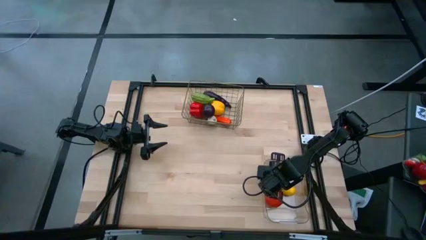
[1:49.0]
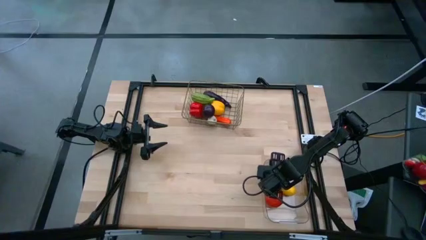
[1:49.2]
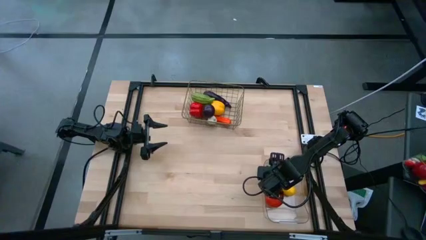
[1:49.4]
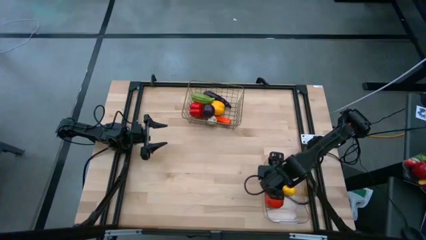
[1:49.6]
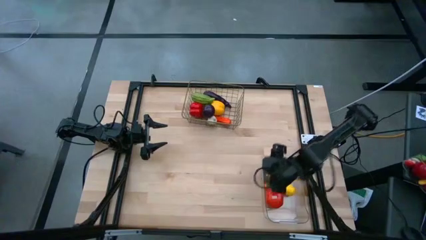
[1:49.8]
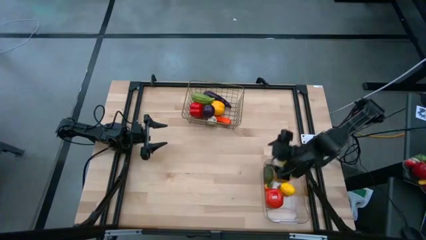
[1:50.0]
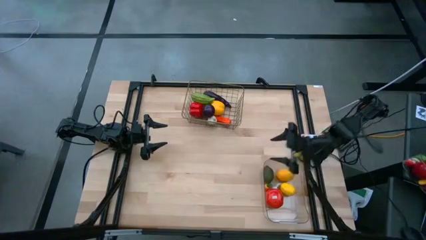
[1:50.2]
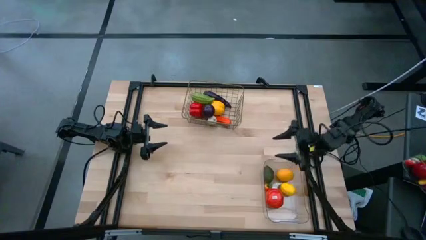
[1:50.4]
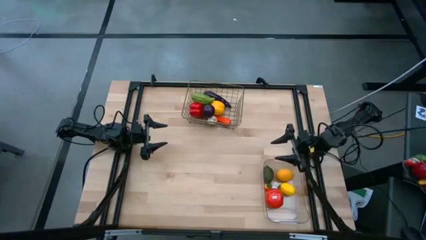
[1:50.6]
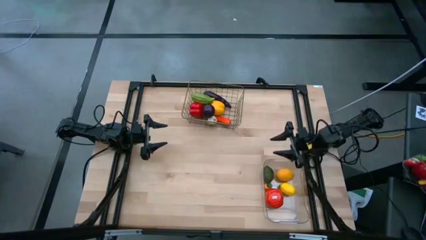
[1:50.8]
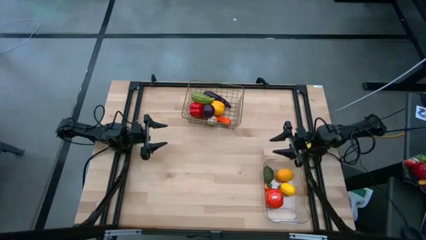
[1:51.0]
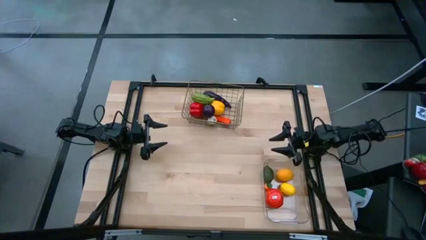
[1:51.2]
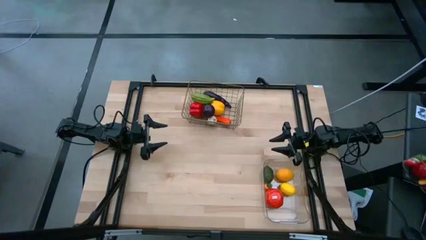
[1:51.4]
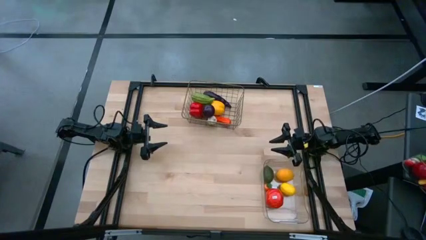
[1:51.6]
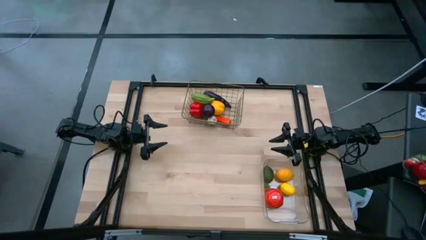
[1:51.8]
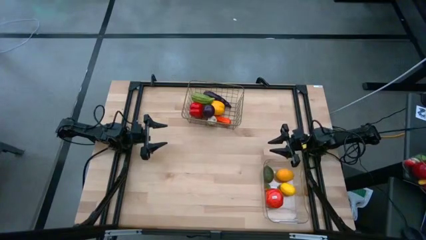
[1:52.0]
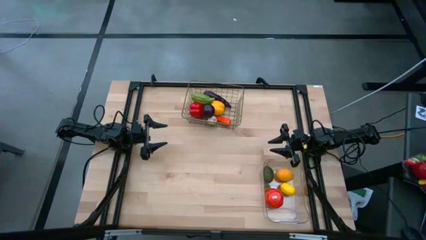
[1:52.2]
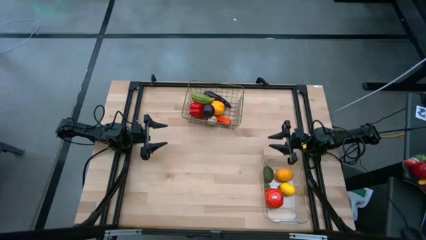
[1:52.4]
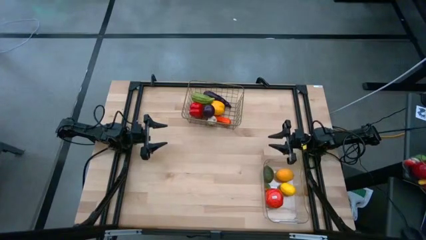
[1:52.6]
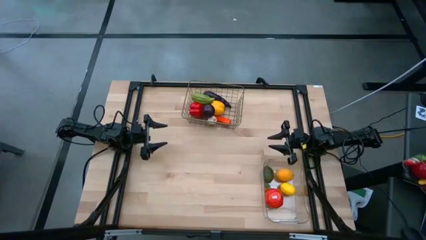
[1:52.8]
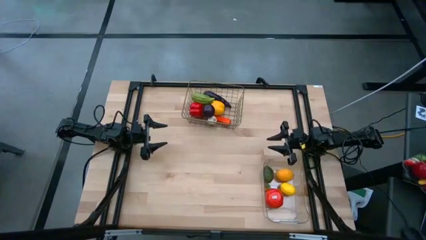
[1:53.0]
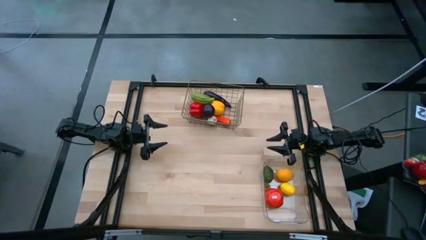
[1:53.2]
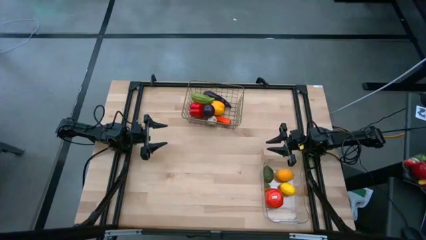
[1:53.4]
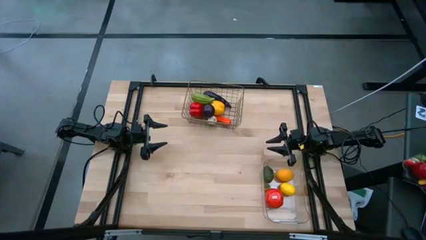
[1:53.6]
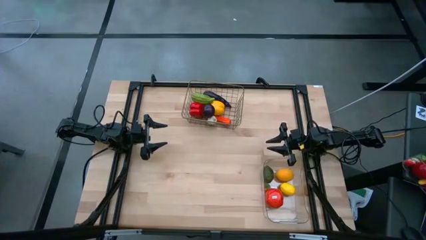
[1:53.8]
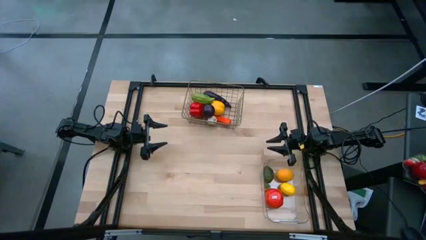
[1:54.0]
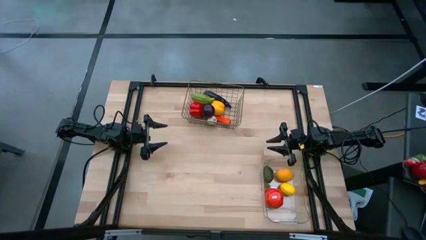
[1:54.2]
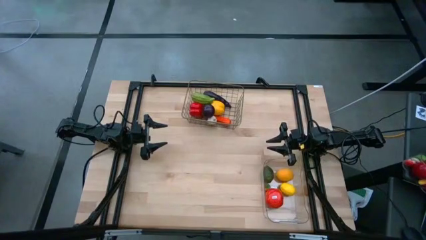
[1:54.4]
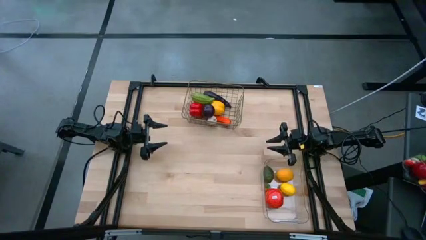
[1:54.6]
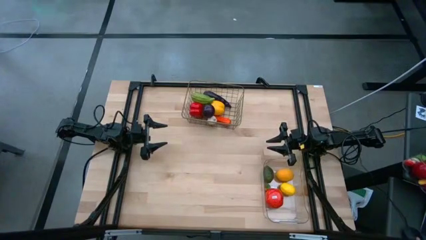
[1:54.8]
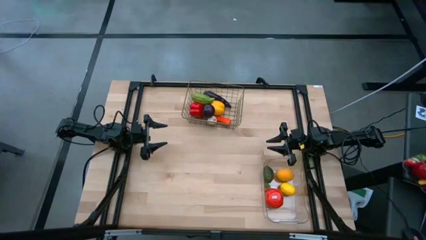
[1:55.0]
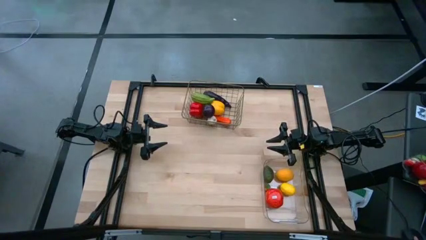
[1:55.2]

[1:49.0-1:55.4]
Task: Sort produce into baskets
Return to Home Position

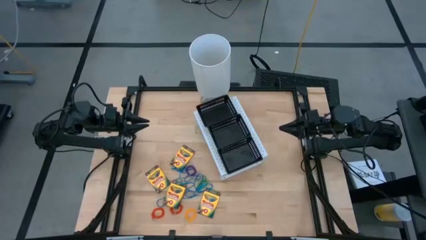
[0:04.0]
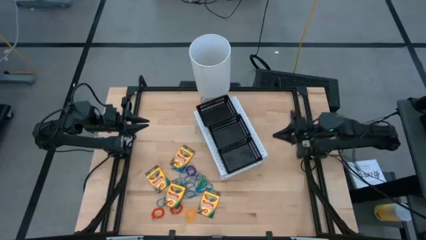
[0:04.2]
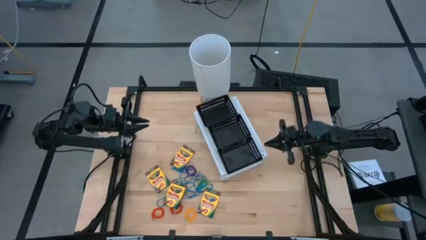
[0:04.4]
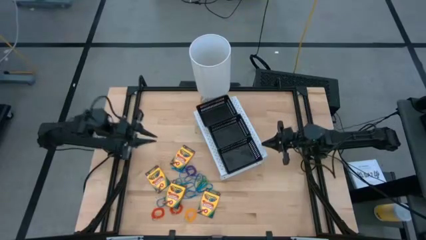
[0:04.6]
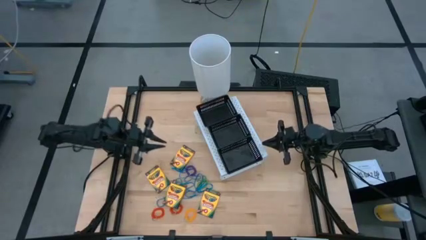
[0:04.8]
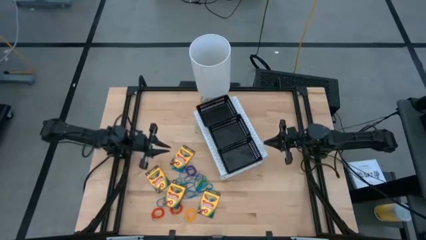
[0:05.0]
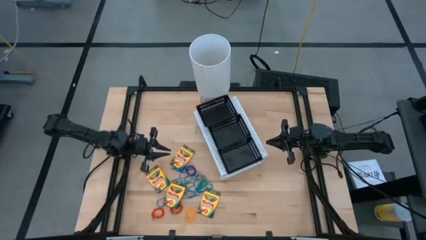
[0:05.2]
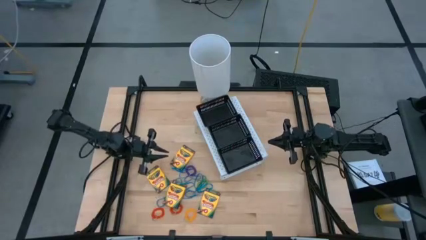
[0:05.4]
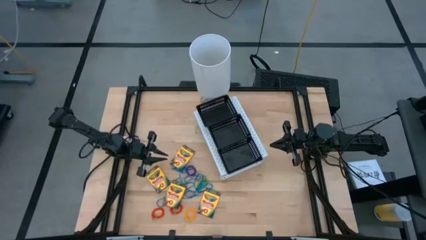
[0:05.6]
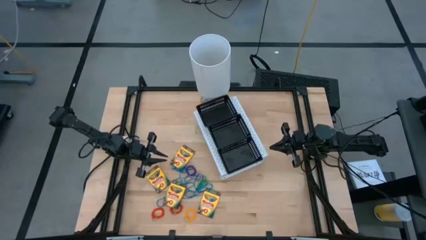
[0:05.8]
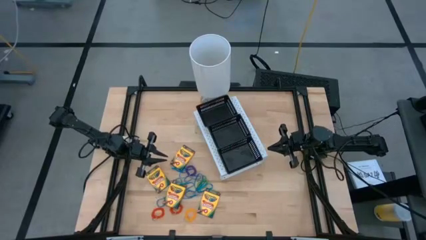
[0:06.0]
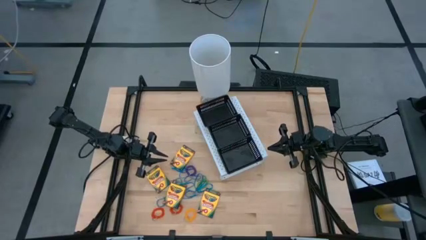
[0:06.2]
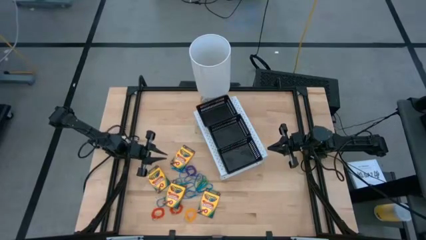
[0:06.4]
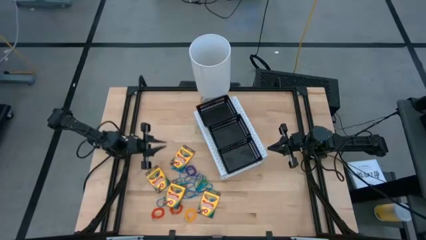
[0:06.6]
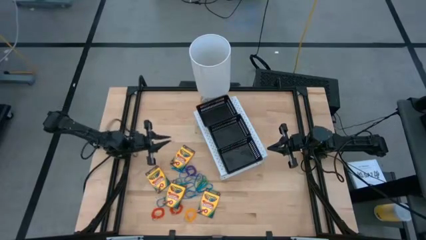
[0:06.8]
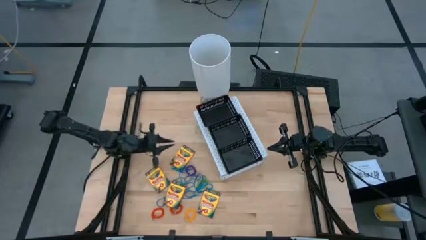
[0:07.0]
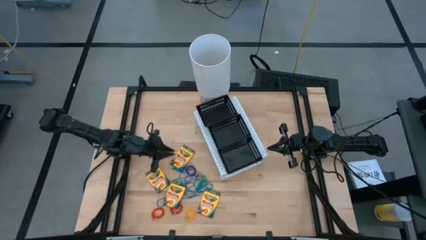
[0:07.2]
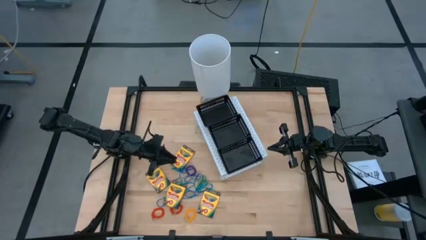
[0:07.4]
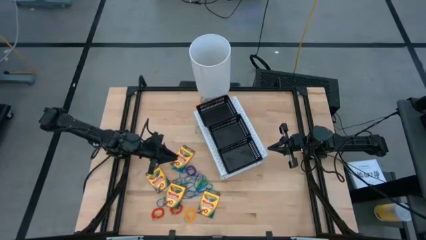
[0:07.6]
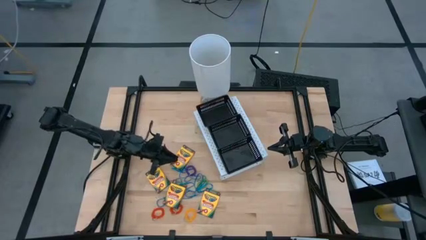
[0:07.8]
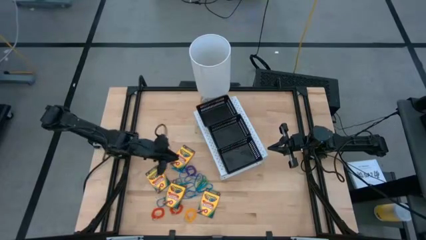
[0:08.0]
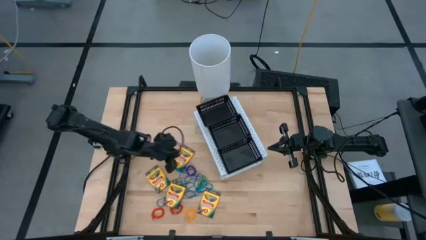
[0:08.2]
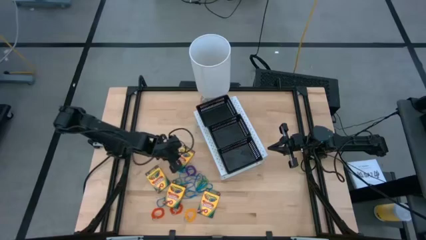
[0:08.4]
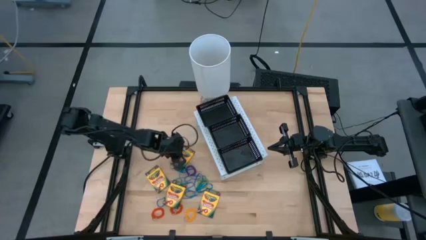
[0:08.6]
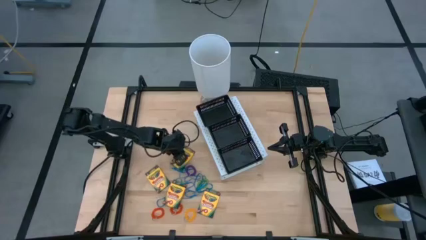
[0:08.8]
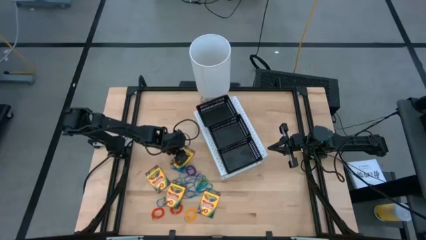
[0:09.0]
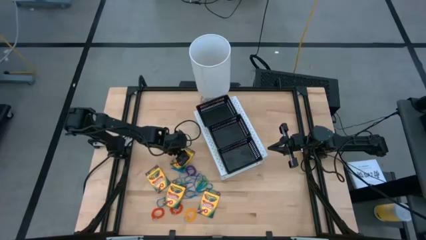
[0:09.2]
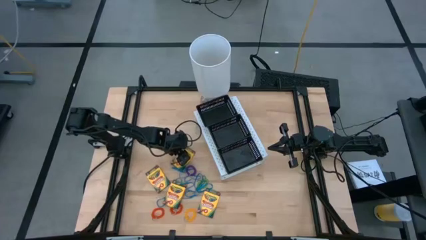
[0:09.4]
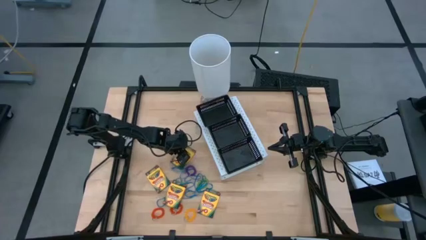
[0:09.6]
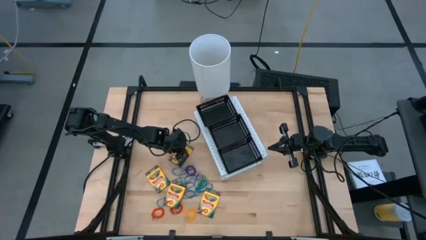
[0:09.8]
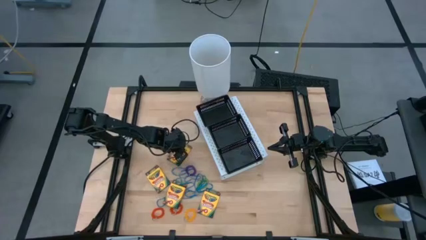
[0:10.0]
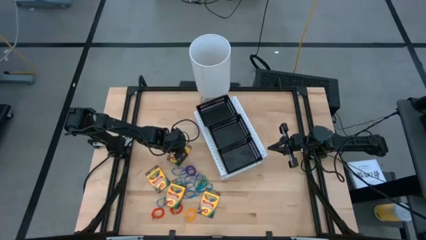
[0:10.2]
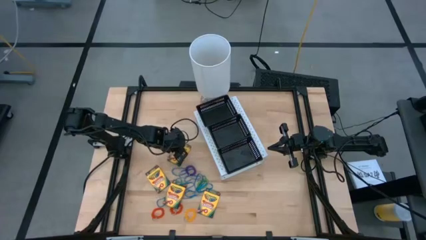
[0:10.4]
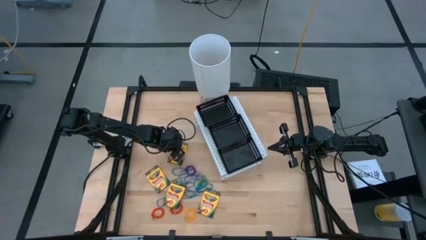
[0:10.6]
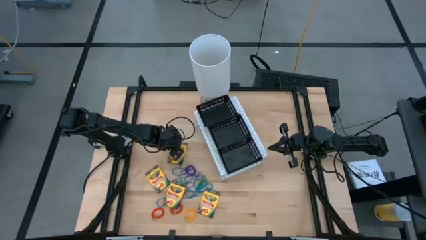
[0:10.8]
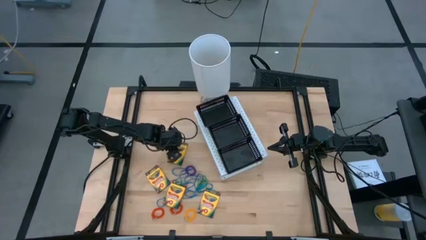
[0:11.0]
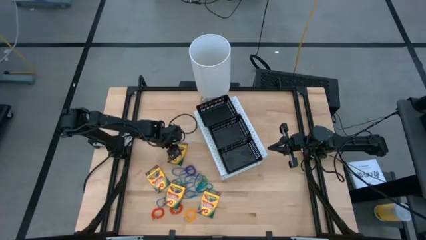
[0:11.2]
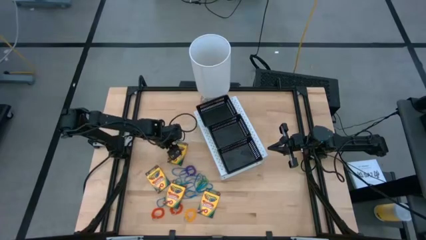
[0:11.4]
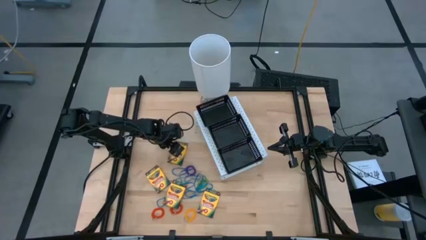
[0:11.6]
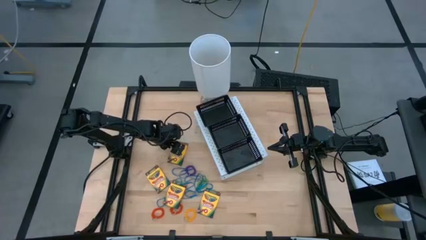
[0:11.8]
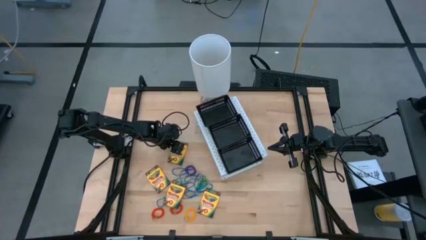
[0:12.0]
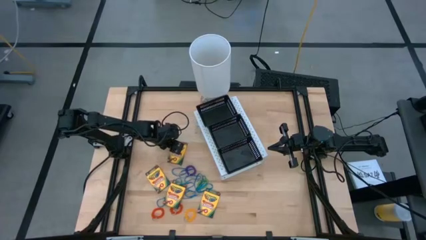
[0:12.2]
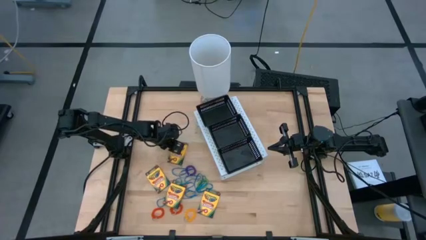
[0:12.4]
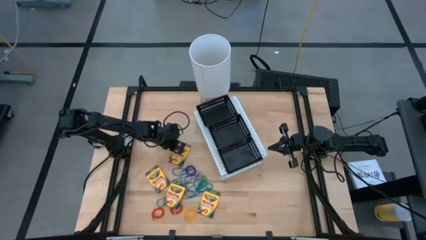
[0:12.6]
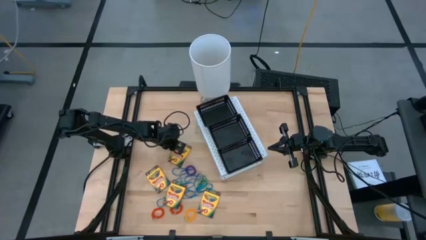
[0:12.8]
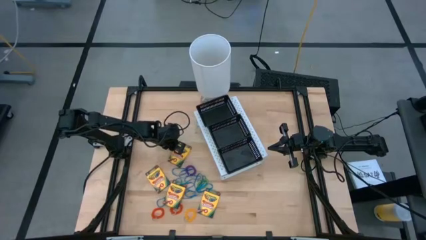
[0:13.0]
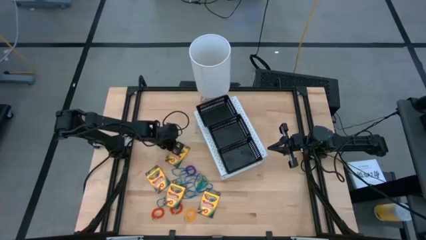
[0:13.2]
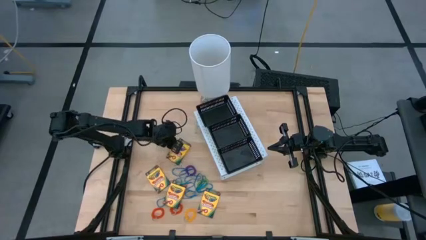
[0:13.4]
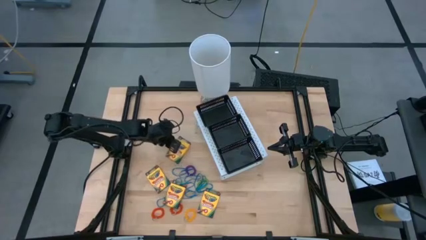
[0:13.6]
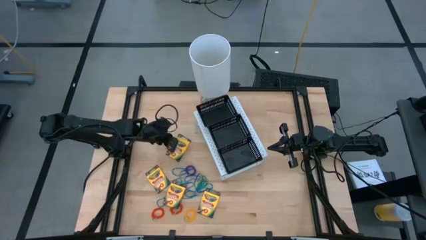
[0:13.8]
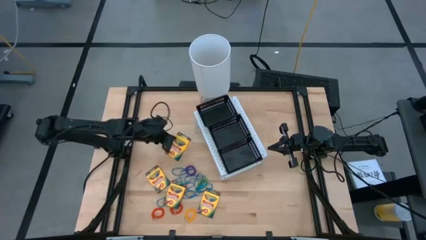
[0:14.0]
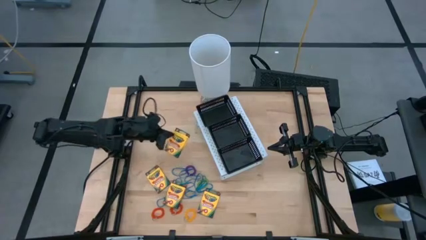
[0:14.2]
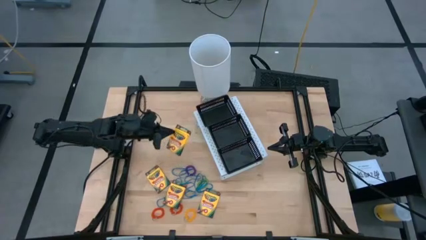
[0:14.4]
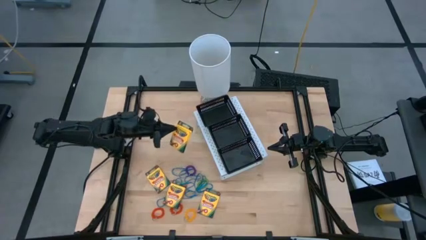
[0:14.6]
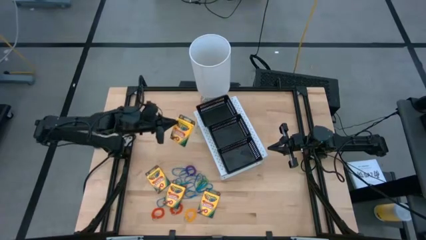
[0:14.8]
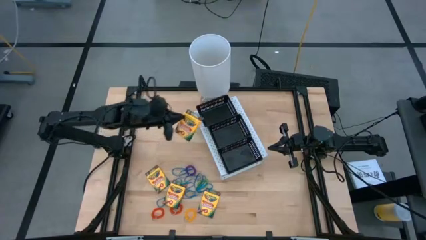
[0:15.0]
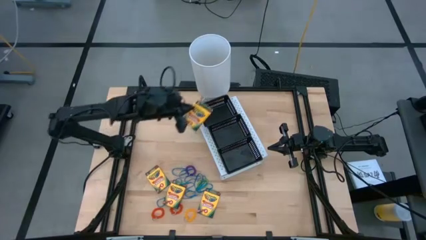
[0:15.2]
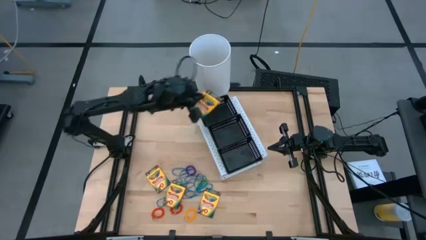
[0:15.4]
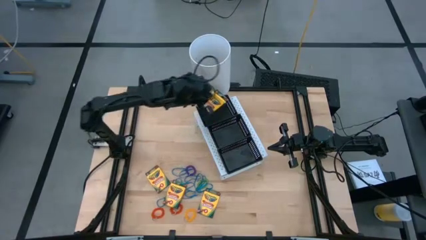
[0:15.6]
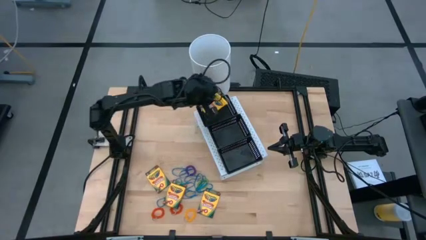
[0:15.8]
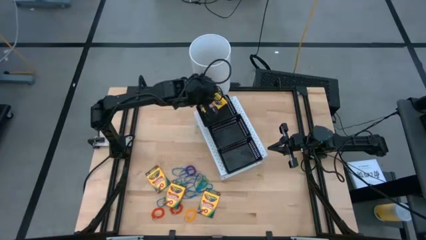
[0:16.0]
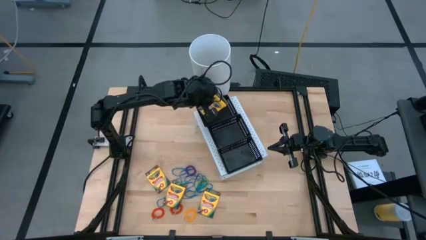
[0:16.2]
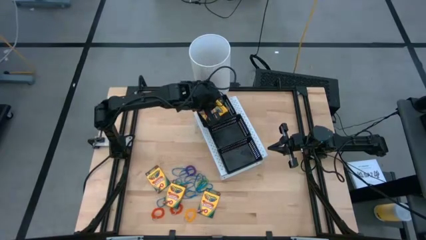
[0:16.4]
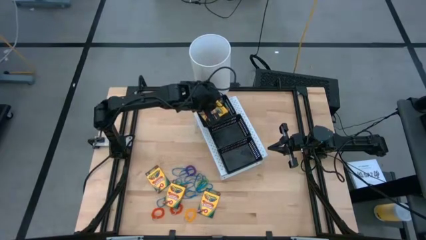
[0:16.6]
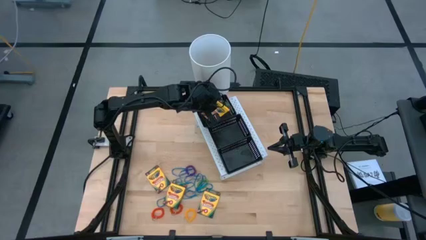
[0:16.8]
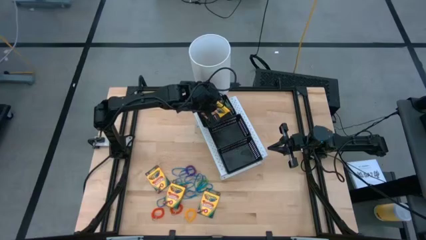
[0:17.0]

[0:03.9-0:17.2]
Task: Pick & Place Office Desk Supplies
Put the crayon box into the top black bin on the shelf
